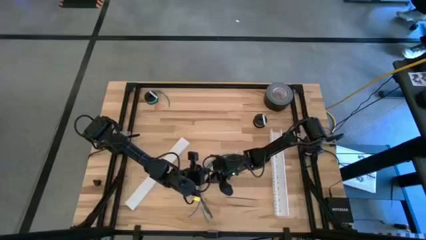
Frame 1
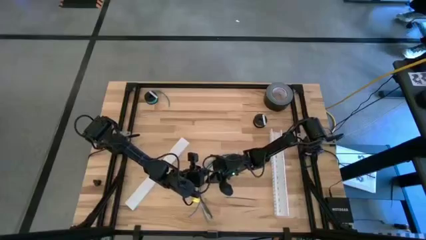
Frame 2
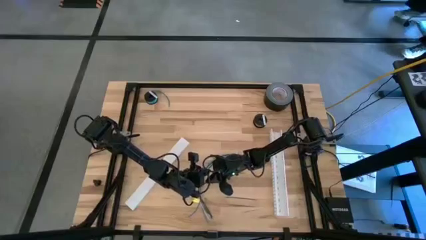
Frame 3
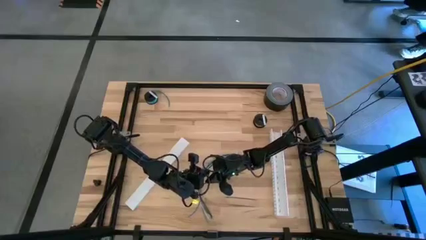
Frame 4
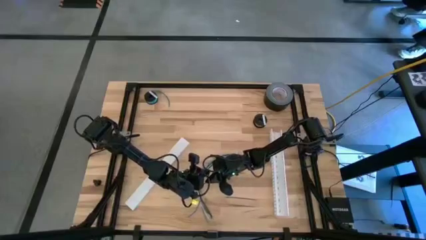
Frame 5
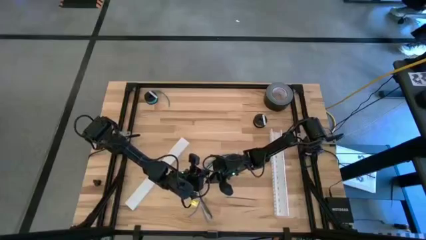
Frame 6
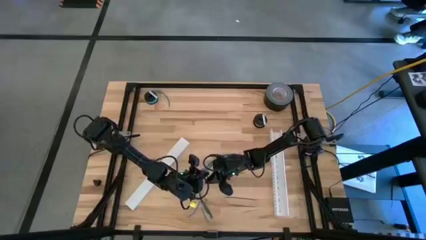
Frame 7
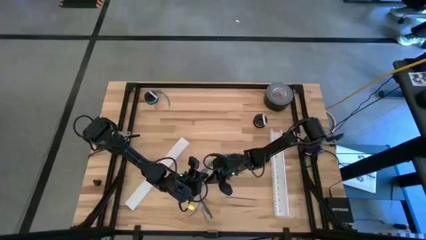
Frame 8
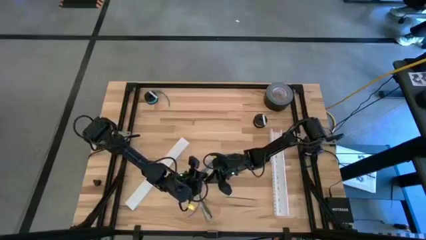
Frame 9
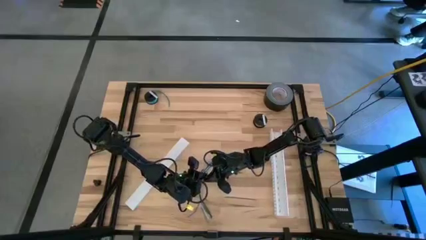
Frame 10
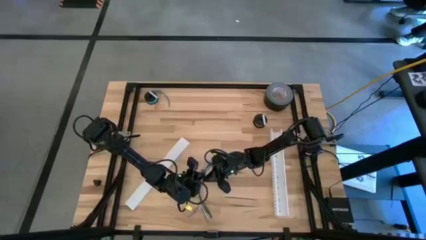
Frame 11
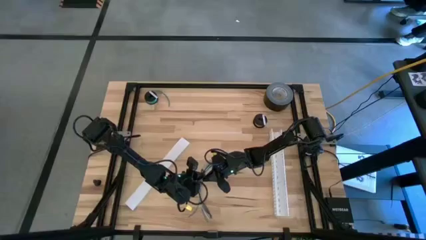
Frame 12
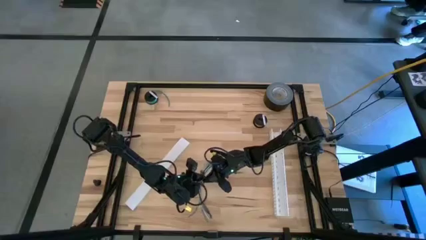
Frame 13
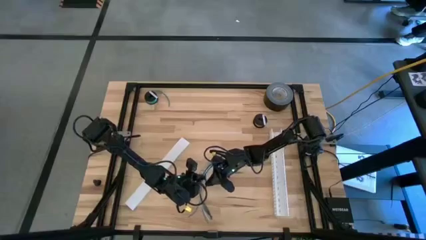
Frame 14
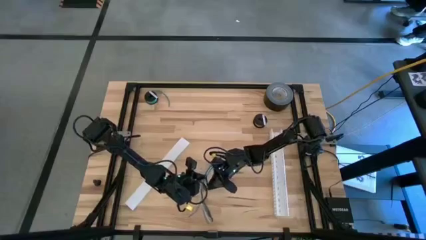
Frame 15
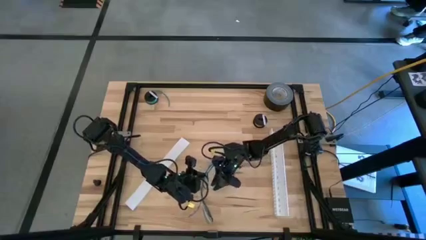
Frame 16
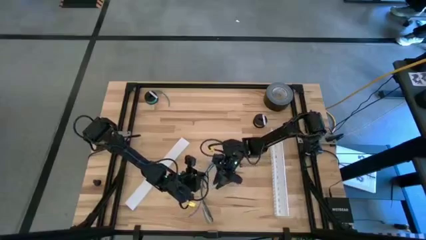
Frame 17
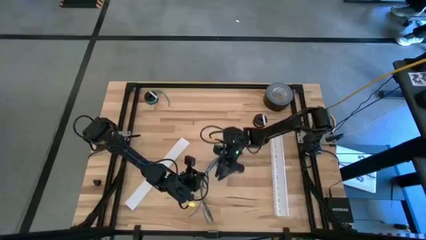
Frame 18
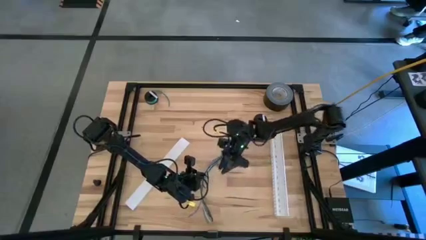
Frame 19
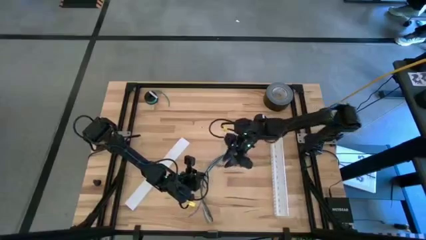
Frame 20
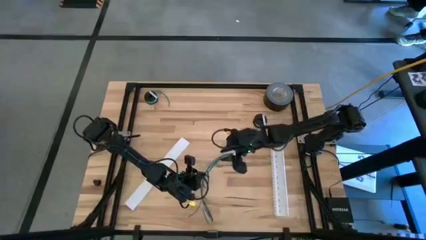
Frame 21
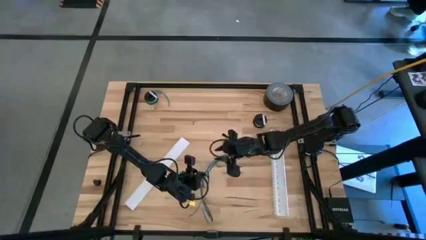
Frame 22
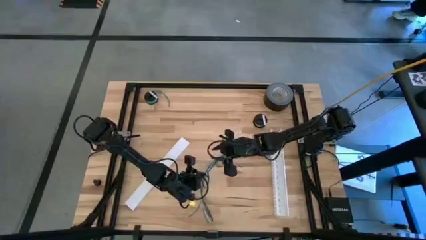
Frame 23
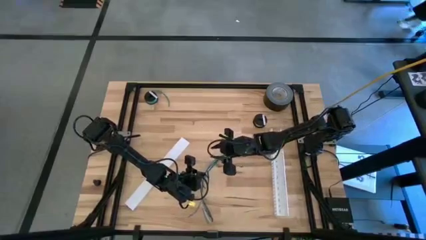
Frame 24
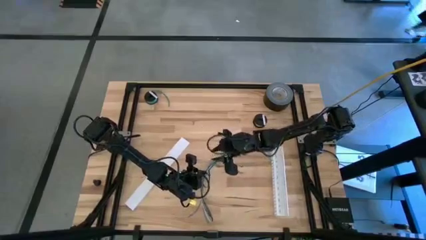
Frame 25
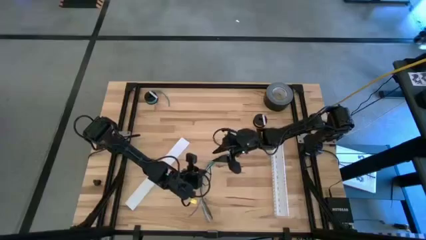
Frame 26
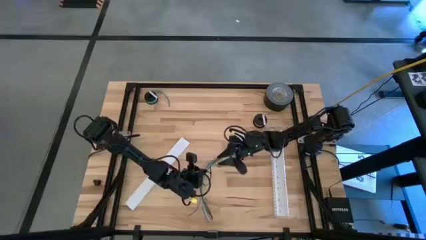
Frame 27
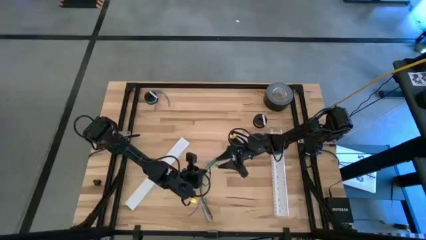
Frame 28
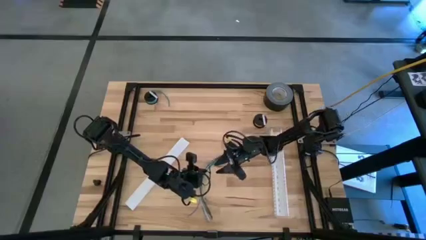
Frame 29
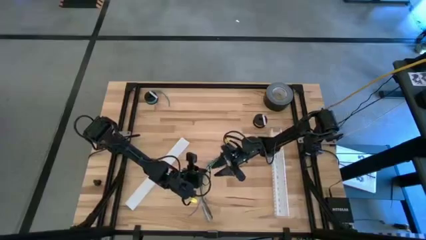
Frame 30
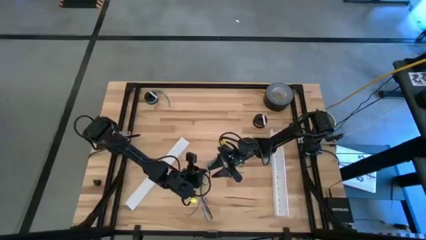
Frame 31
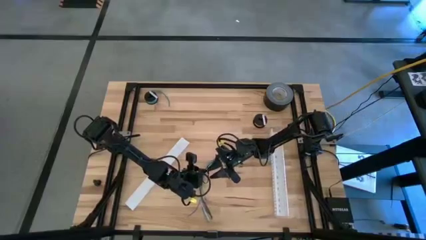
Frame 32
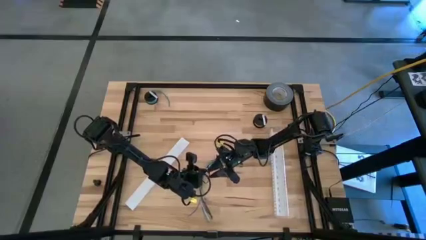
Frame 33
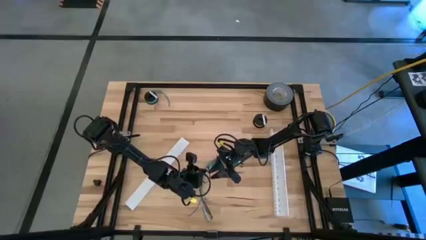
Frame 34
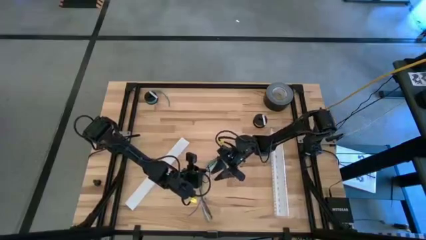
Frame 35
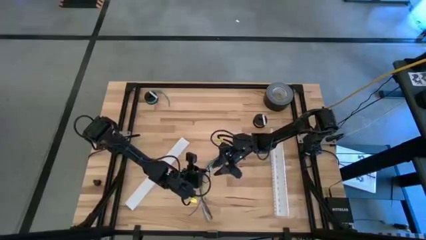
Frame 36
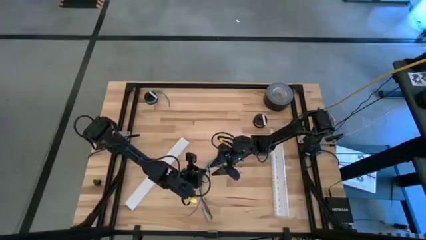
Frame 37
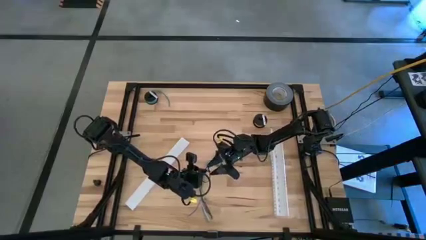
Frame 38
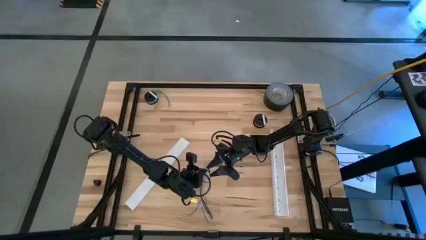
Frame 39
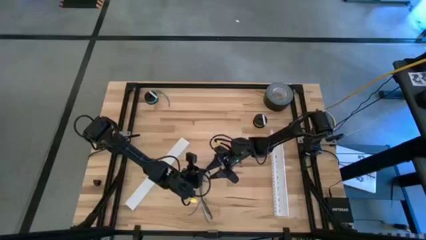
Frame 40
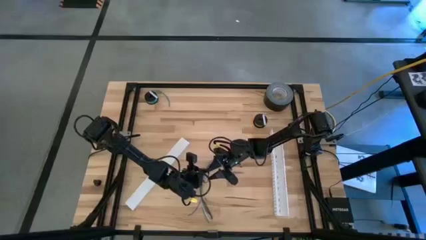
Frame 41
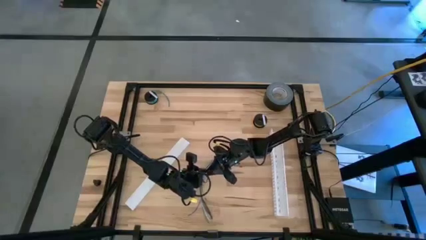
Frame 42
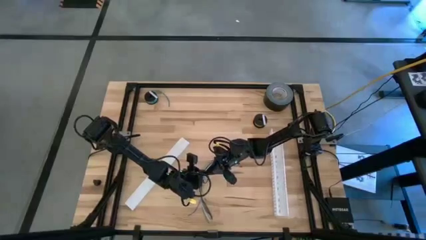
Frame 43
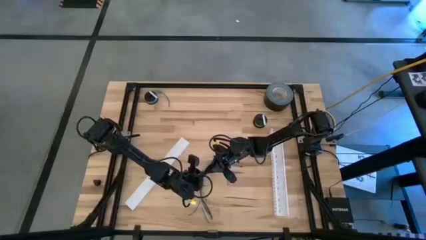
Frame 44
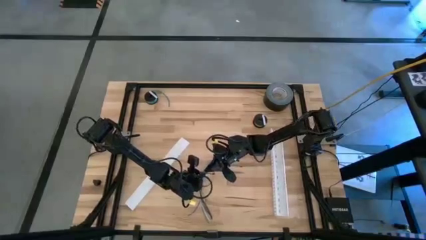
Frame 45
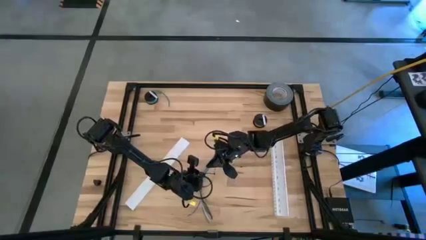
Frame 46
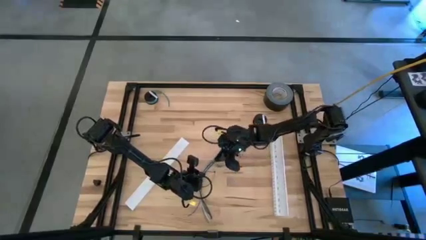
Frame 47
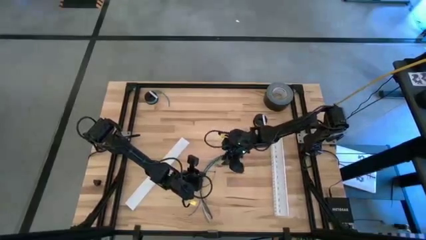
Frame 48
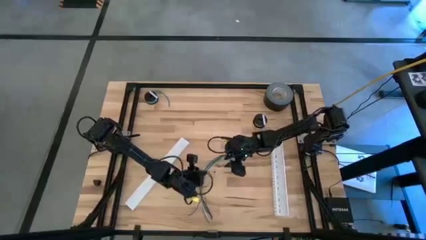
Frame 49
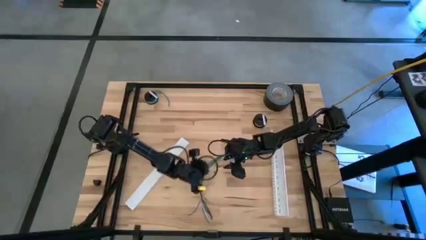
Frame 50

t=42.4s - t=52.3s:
Task: Ziptie cables
Wrap the cable wires using the black zip tie

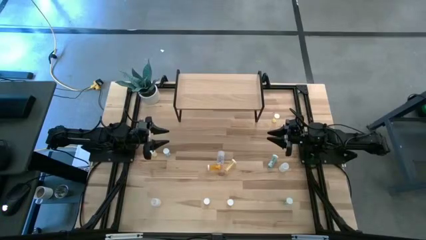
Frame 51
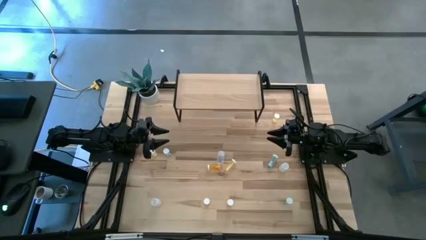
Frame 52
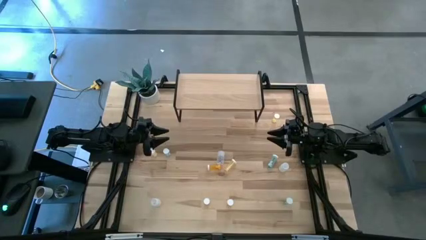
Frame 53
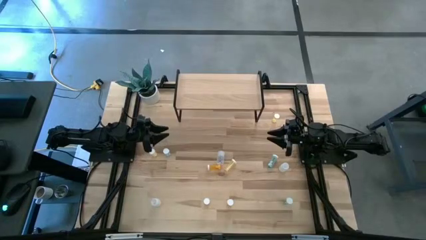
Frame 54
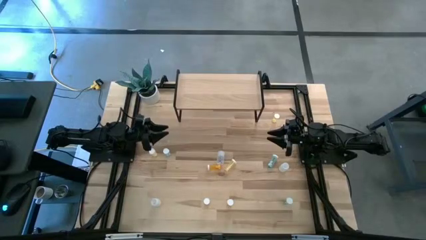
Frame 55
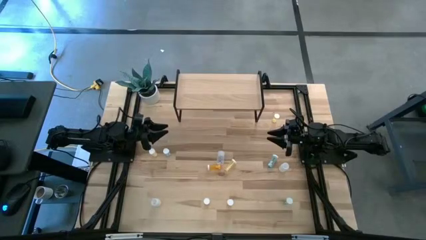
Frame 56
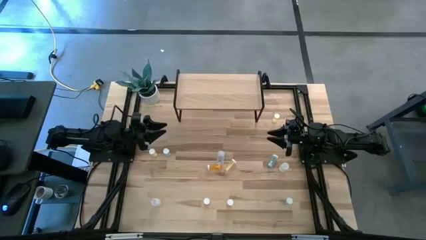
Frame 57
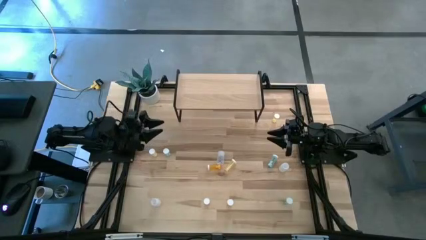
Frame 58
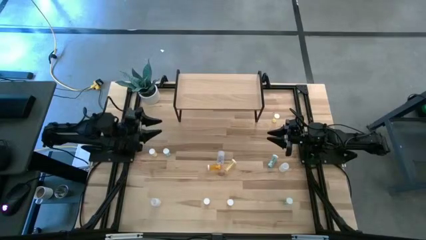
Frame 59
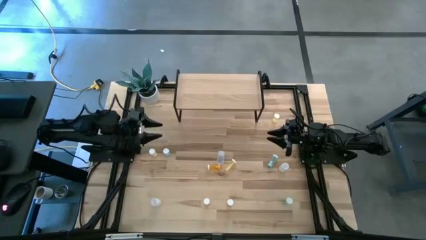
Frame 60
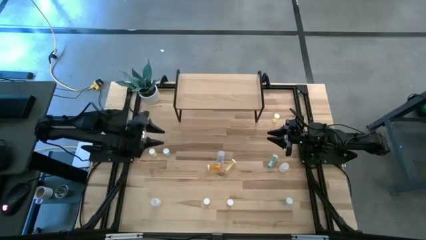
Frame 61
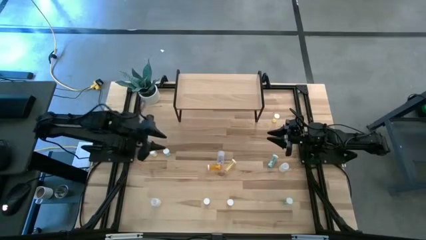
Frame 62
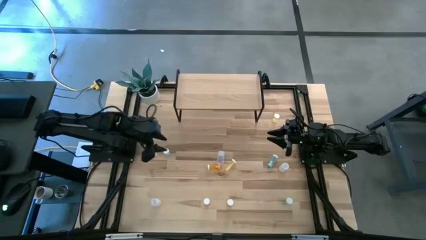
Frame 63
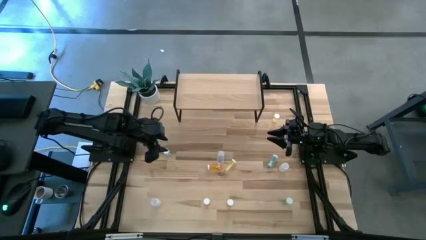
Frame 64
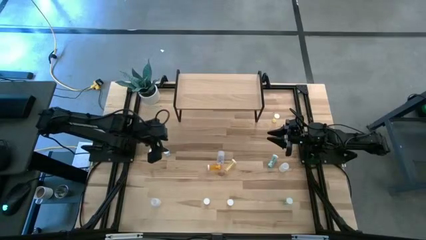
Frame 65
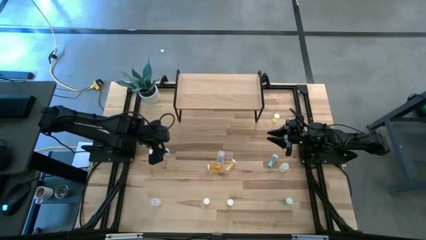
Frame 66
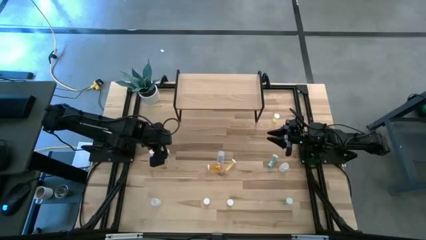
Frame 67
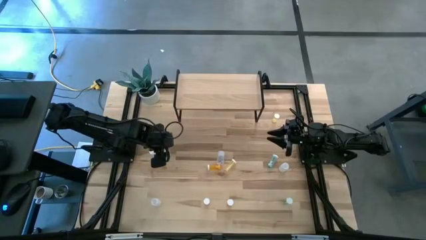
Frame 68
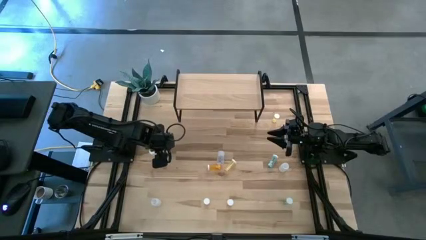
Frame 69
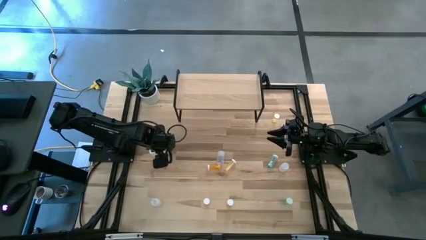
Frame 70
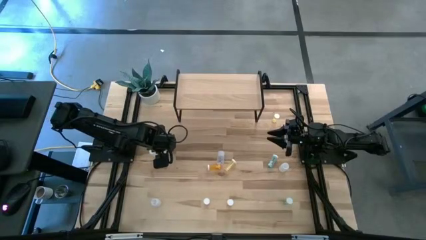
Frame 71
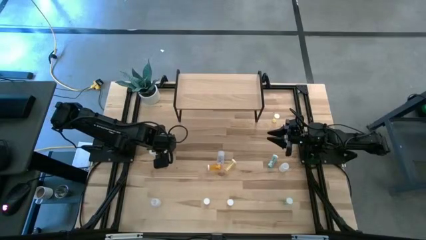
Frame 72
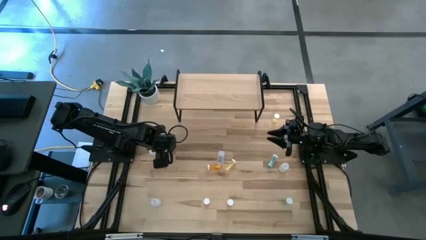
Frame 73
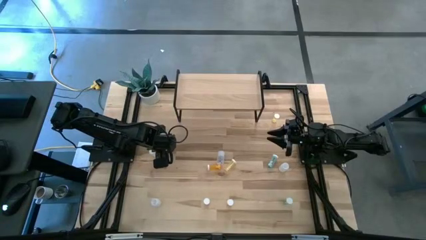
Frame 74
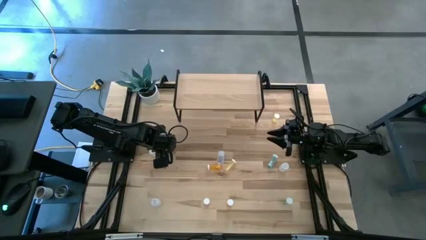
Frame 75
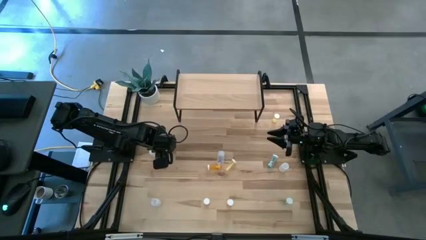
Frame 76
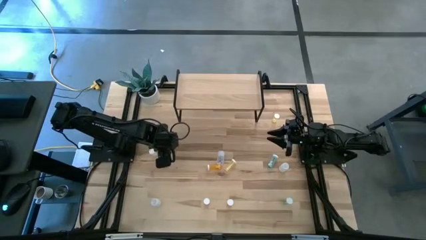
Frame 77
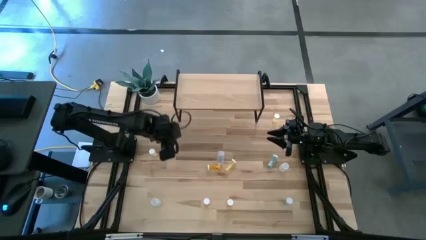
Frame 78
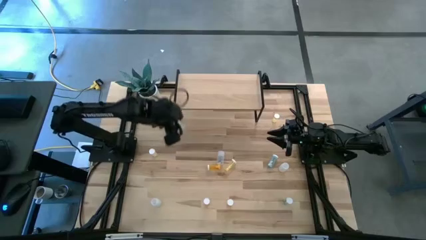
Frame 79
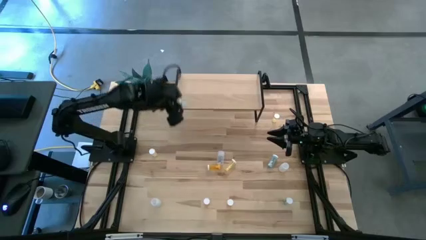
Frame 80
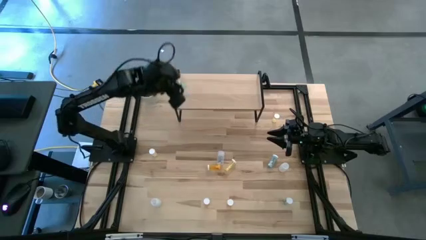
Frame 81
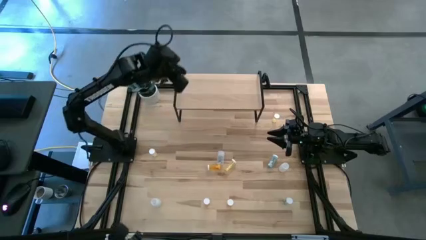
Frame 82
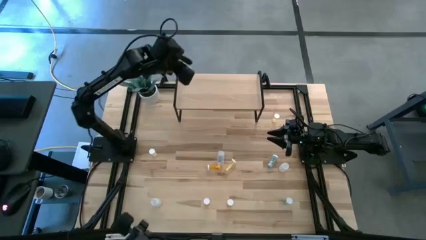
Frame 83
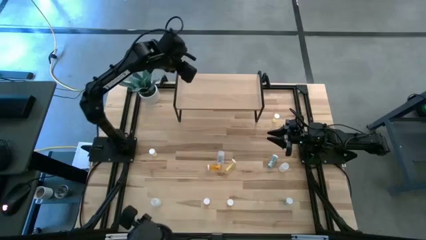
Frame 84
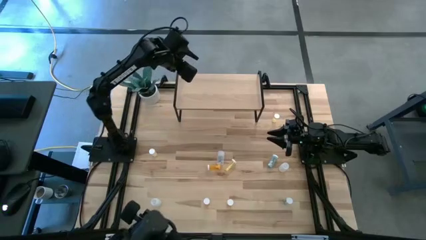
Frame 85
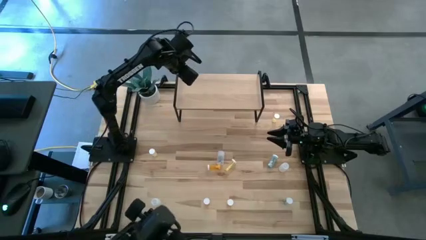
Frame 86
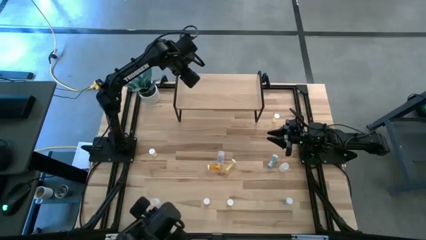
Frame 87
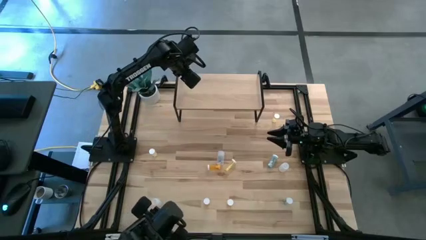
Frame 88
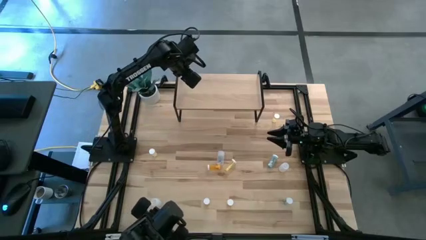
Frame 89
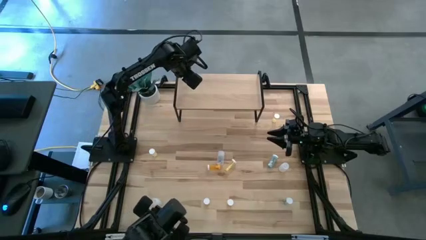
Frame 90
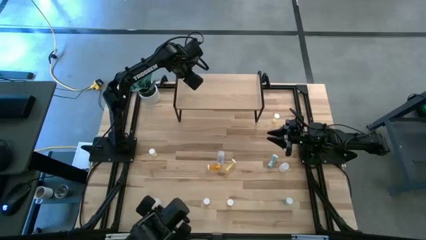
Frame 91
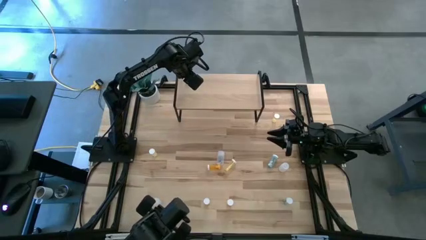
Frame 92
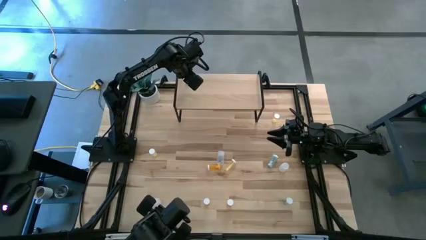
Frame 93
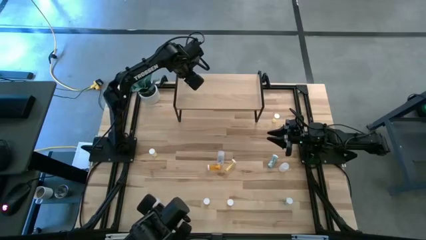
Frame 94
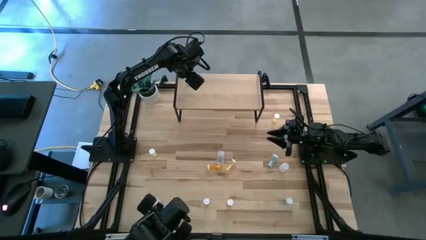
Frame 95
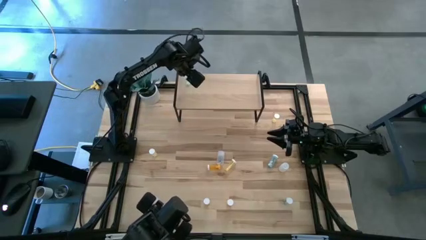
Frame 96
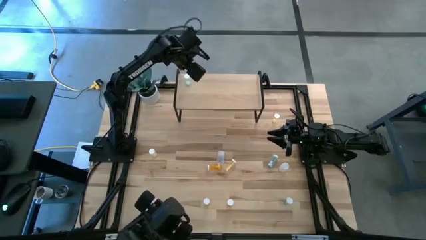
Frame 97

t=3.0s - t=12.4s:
Task: Pick and place medicine bottles onto shelf by color
Put the left blue pill bottle on the shelf
